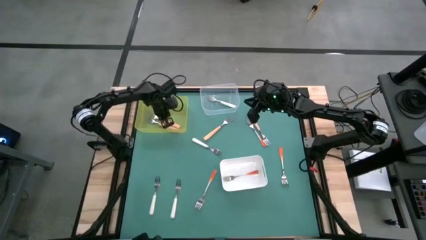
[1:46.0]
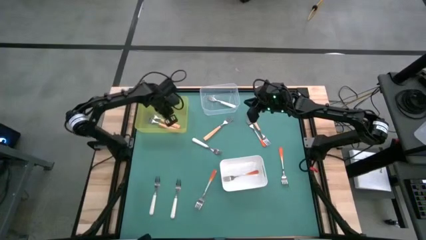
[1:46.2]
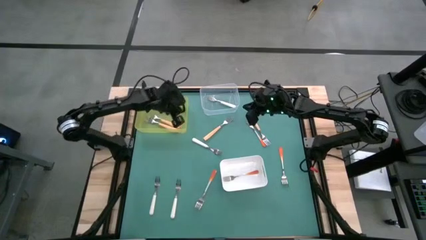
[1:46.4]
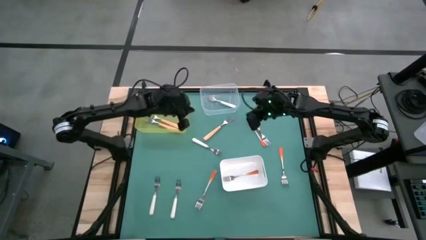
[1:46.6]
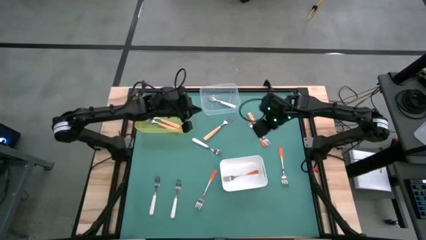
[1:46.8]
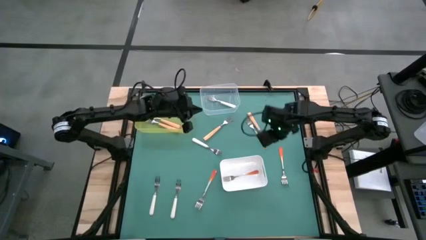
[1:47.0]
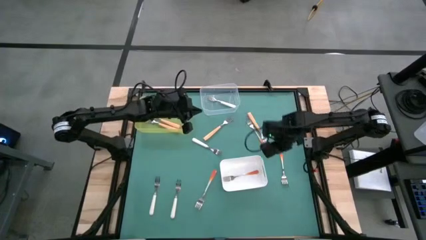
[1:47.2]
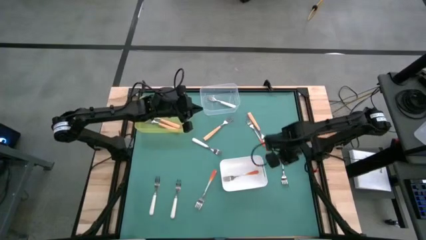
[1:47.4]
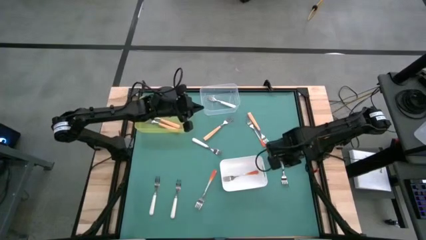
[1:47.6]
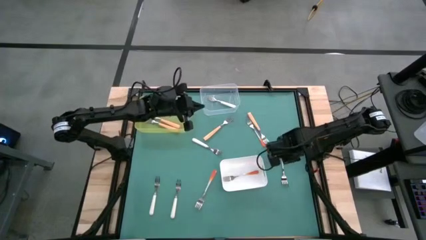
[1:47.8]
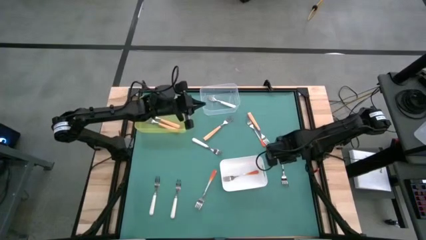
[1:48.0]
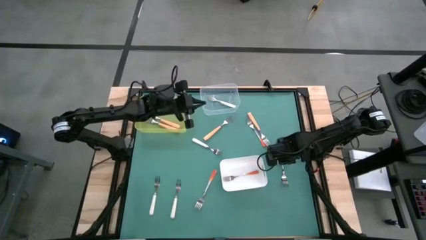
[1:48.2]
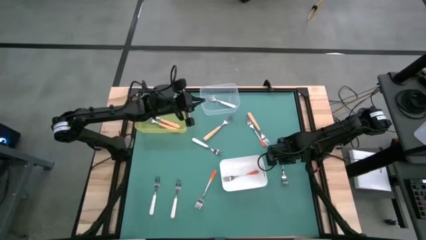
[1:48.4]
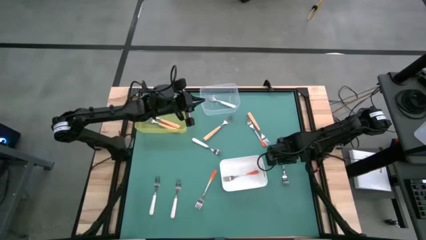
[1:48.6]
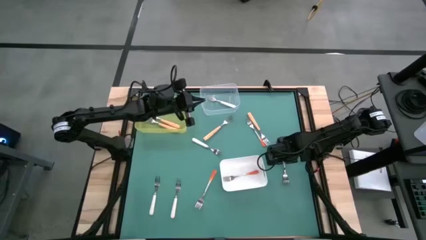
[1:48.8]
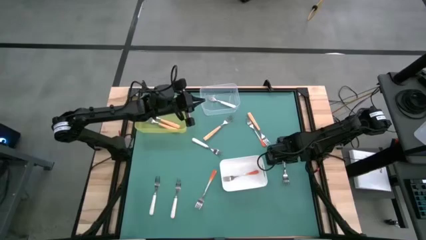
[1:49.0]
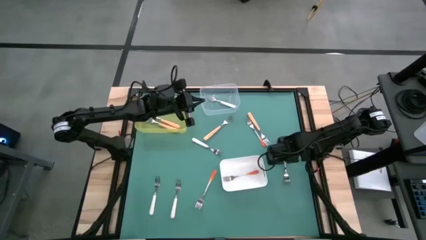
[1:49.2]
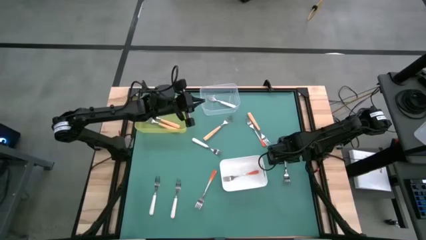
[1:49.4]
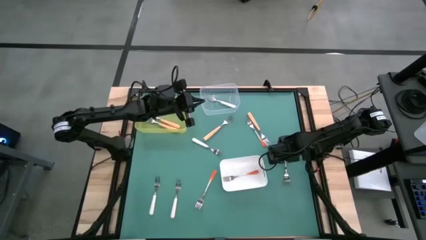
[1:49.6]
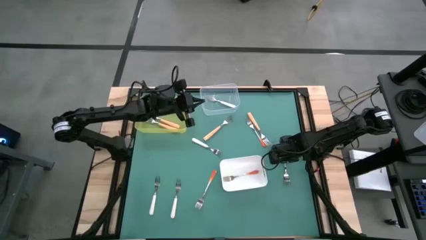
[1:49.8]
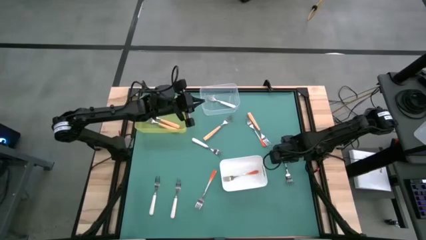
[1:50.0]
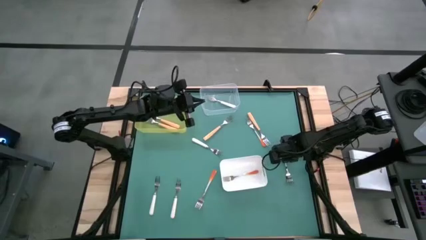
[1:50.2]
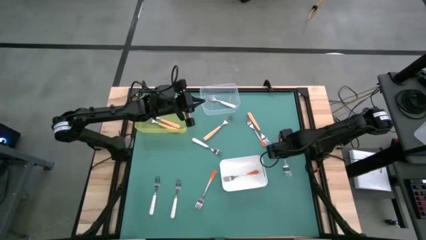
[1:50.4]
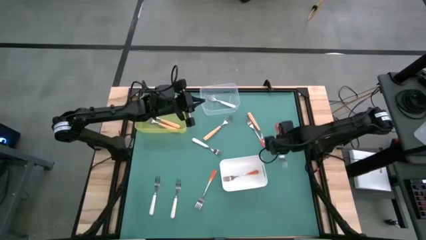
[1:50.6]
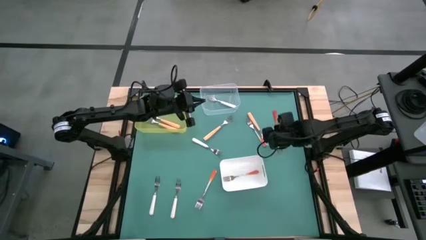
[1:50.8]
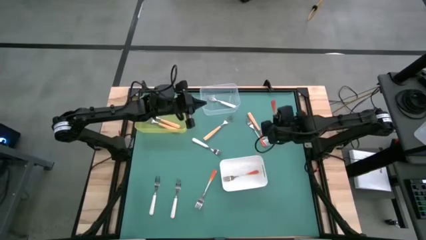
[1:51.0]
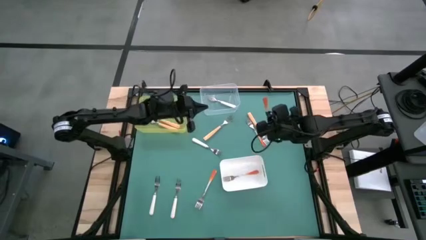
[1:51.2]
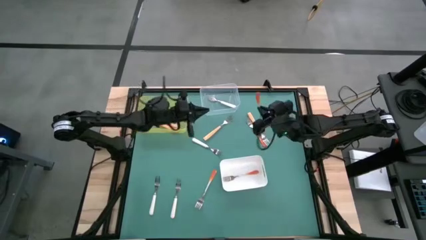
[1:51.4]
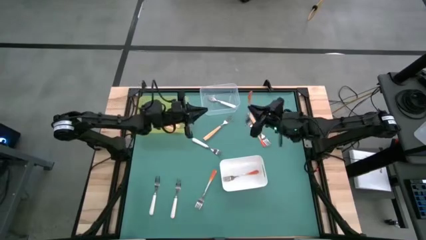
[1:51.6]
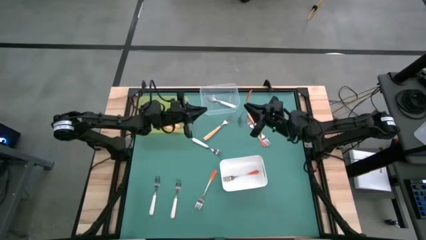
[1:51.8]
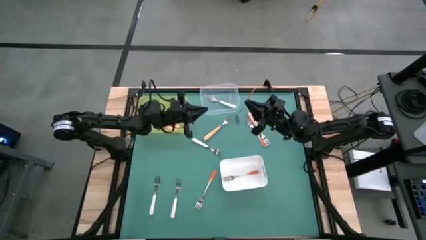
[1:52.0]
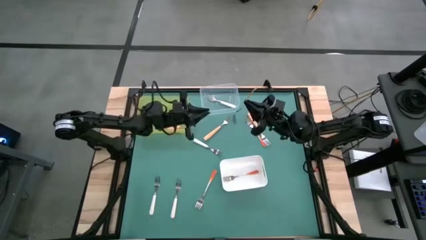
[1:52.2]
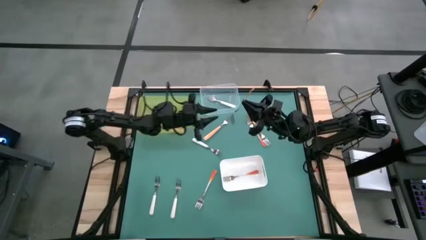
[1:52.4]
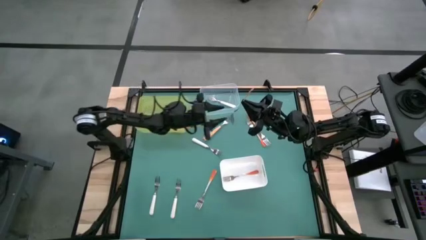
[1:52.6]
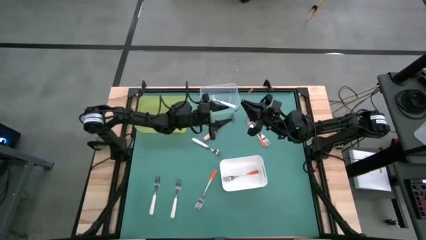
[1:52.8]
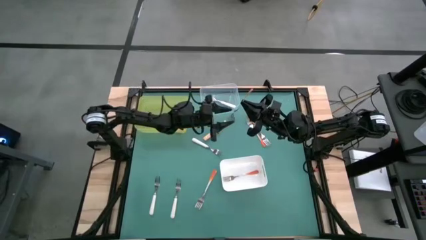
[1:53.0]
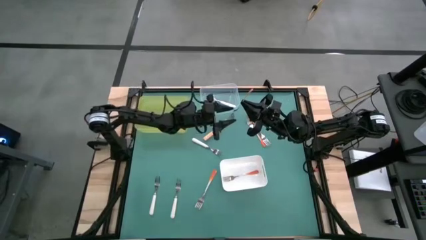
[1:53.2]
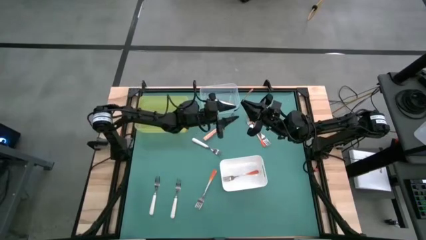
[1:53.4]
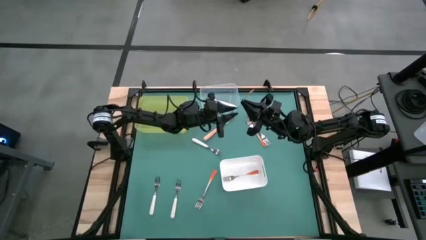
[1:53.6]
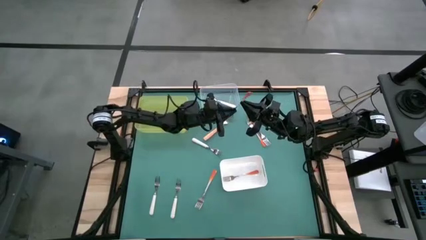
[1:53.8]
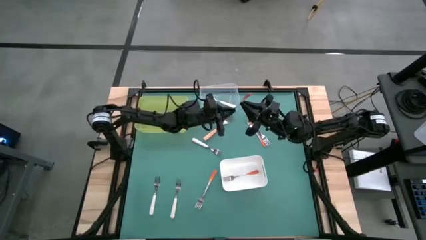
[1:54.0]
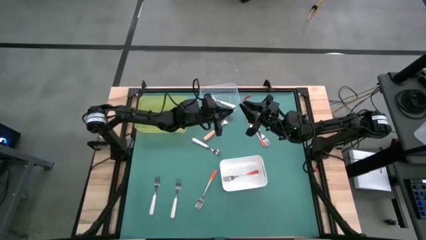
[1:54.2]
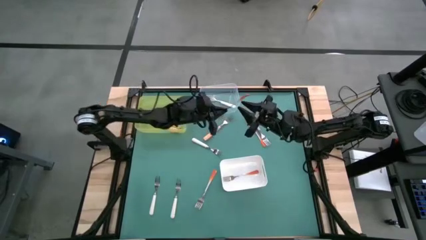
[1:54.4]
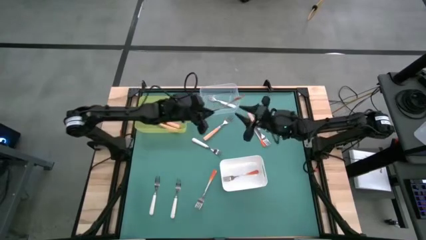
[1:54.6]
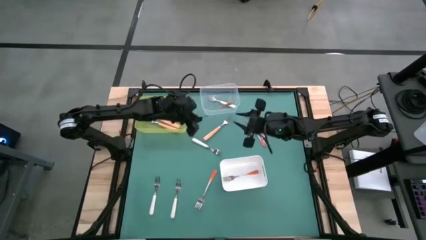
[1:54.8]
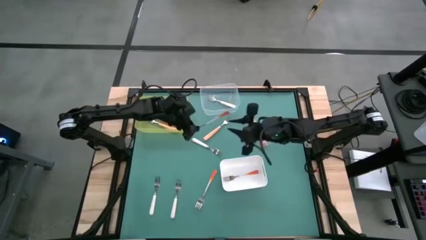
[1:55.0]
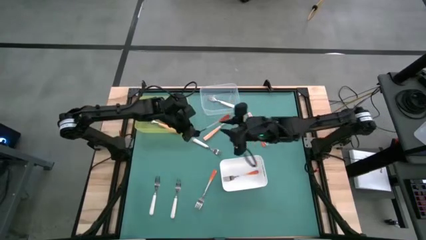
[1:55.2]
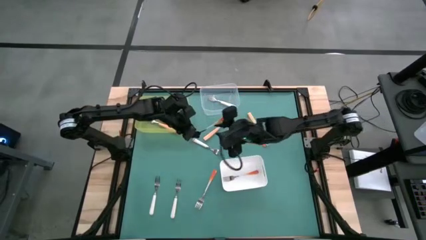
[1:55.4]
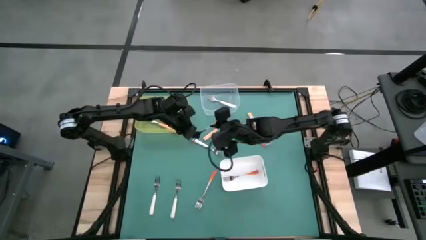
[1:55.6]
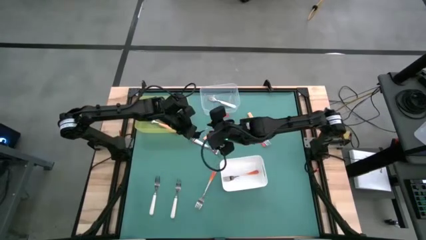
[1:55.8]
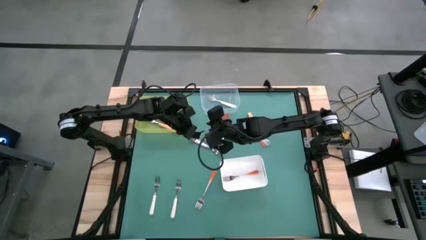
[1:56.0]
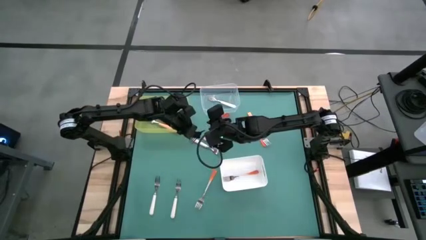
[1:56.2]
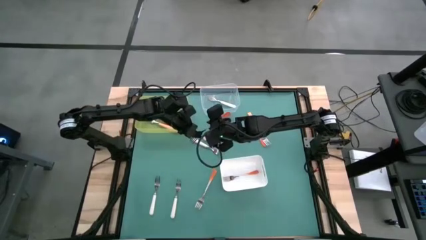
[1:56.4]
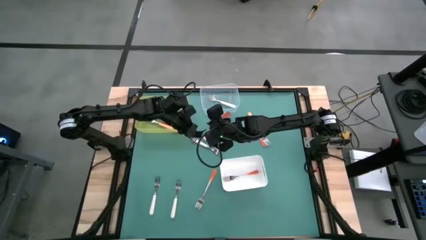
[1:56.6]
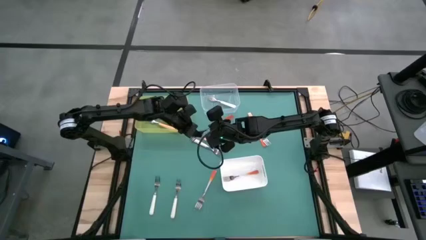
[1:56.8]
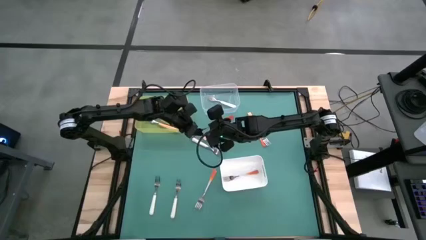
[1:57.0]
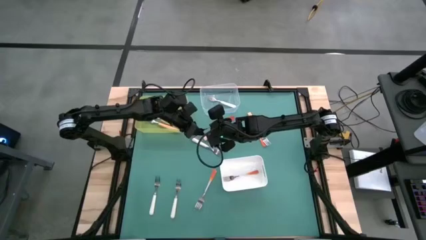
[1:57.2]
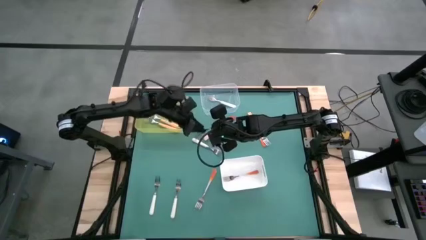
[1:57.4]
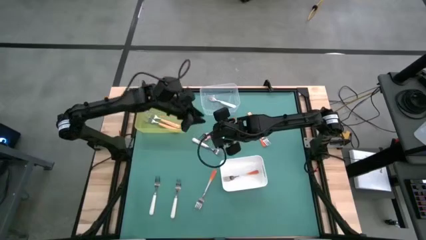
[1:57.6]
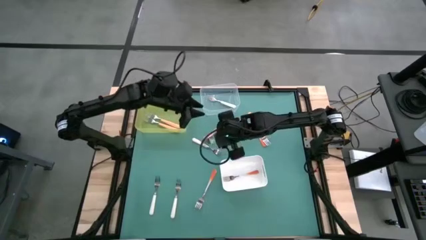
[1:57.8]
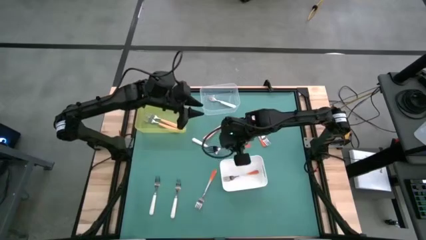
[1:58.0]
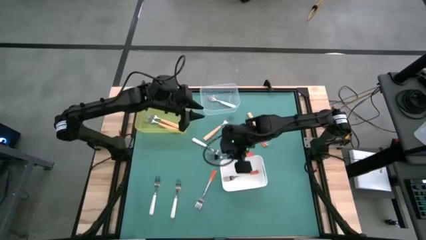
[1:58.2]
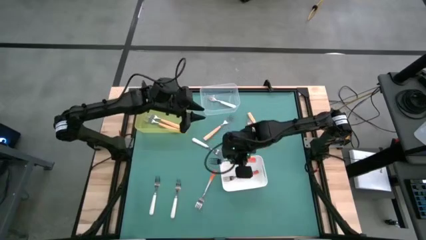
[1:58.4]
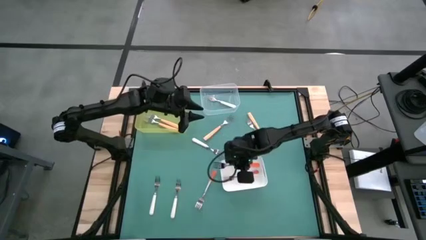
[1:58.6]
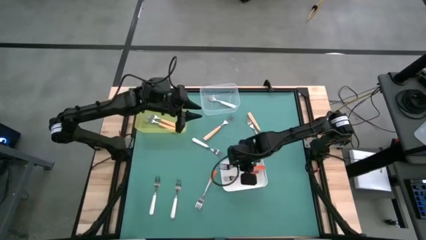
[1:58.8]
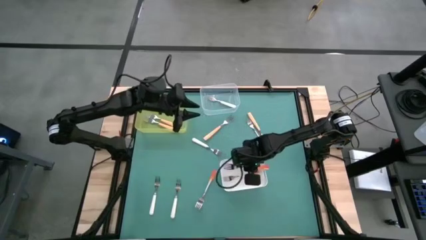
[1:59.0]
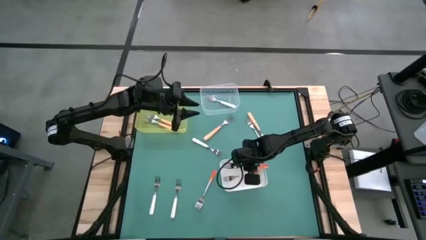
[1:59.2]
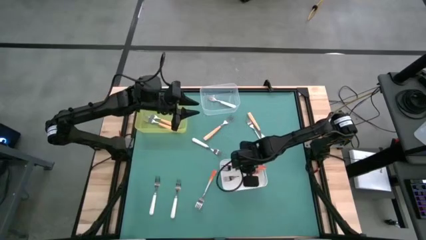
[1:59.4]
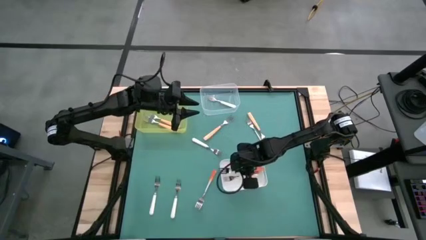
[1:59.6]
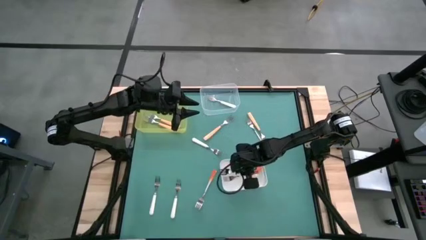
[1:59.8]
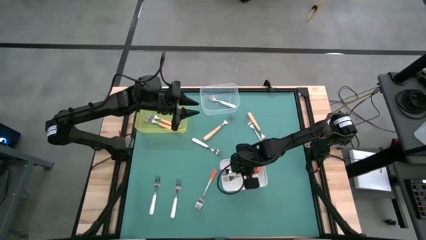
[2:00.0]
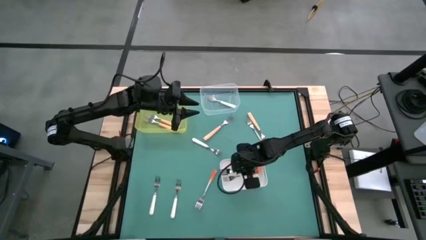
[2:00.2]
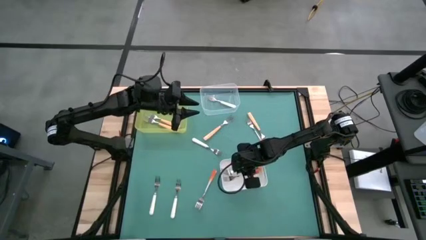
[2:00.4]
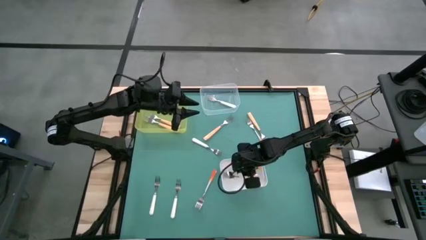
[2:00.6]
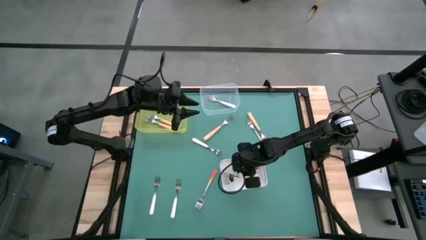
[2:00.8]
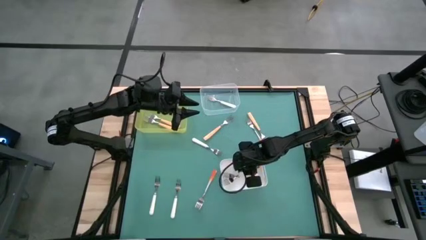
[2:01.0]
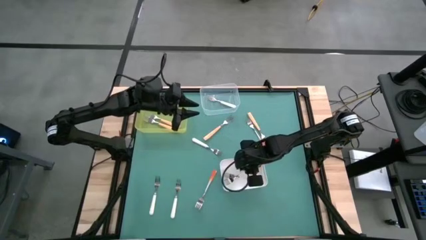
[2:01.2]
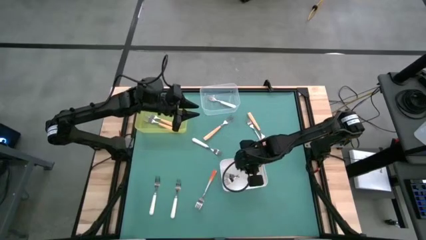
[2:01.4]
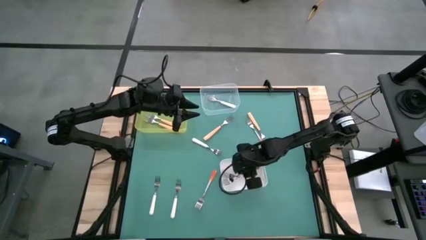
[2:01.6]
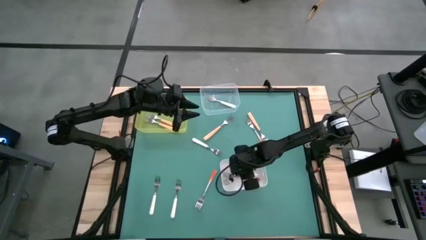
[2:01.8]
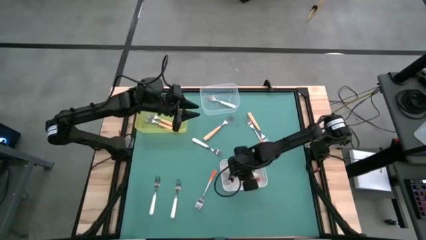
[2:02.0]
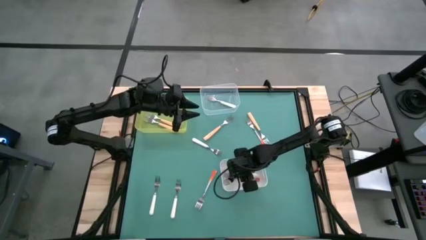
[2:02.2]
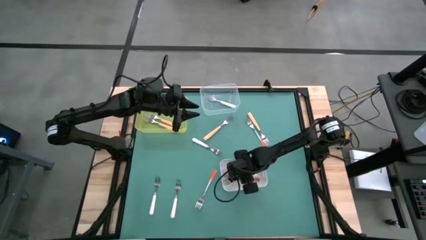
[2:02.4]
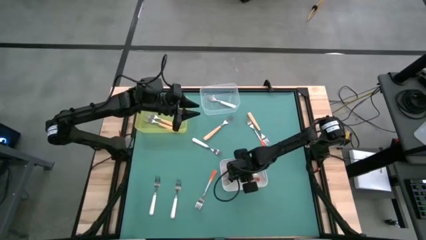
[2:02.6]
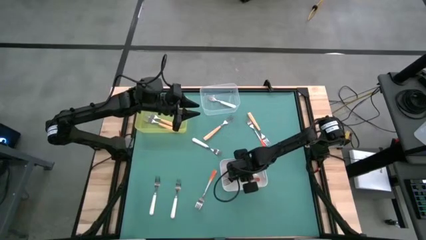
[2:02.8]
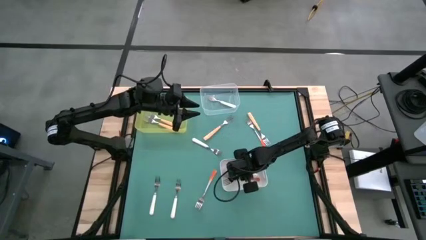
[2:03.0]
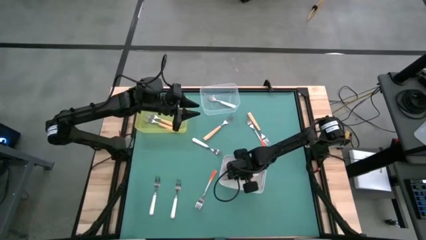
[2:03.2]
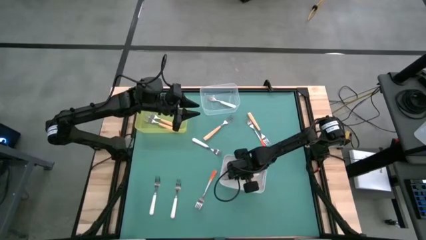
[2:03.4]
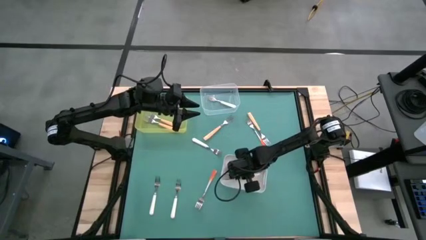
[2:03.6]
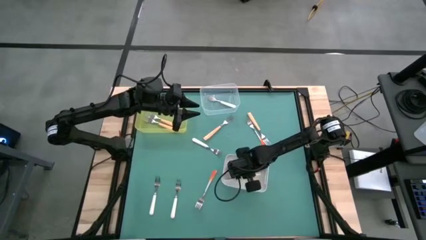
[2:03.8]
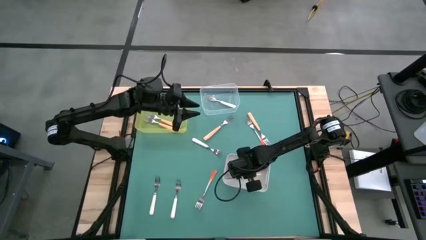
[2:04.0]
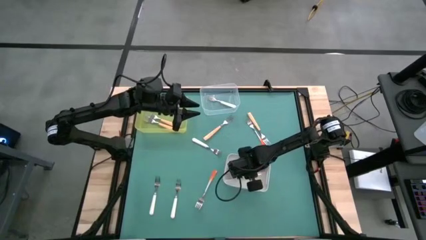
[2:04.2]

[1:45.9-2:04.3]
Task: Sort silverware by color (type)
Put the orange fork into the white bin
